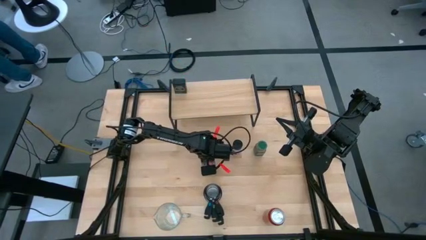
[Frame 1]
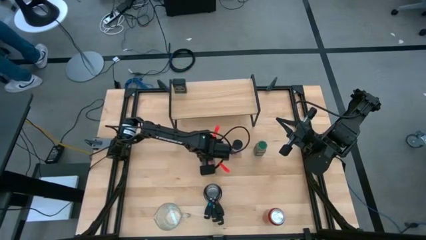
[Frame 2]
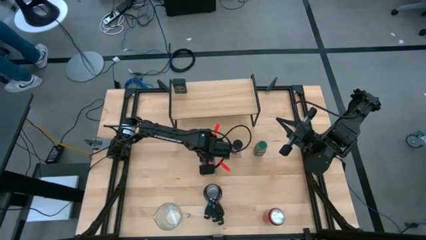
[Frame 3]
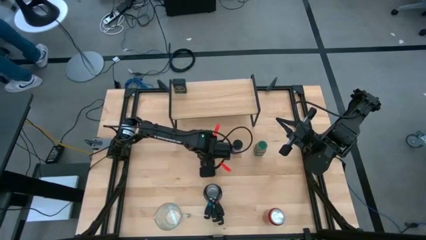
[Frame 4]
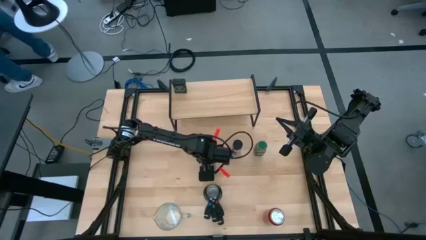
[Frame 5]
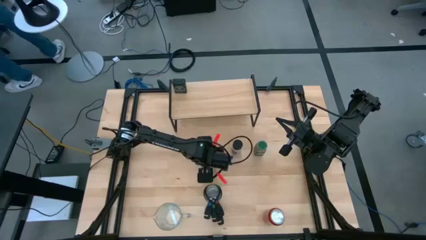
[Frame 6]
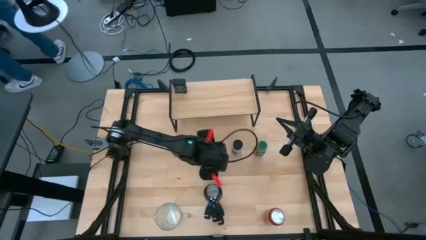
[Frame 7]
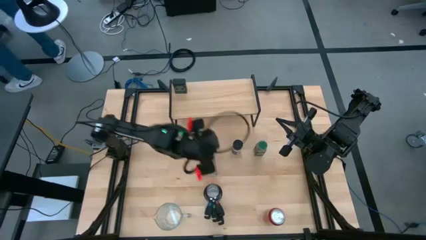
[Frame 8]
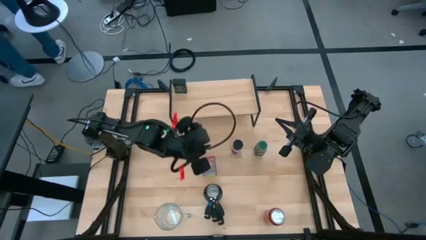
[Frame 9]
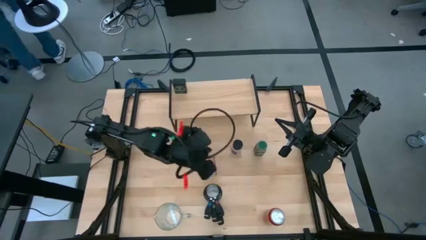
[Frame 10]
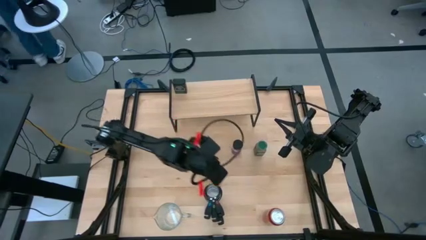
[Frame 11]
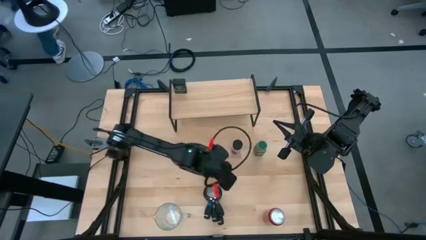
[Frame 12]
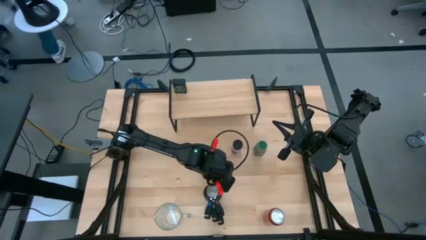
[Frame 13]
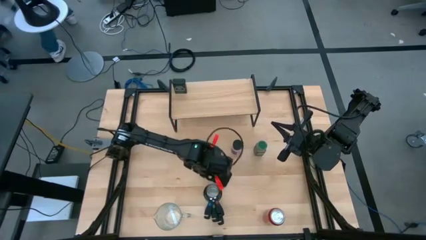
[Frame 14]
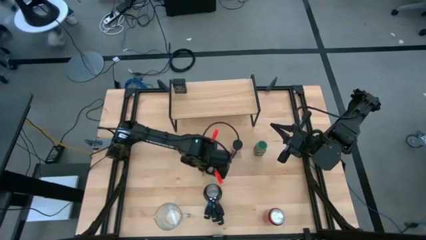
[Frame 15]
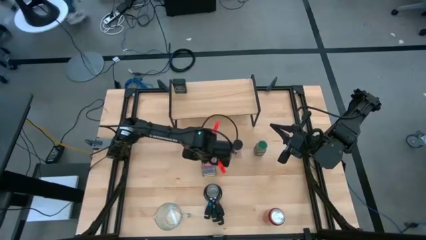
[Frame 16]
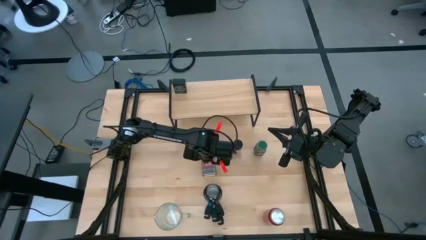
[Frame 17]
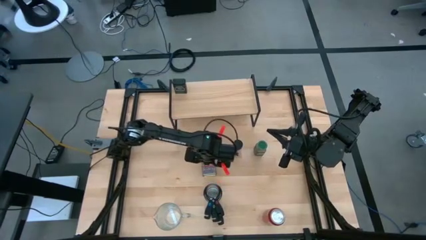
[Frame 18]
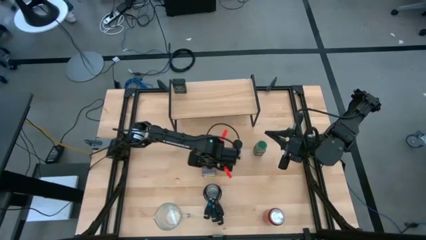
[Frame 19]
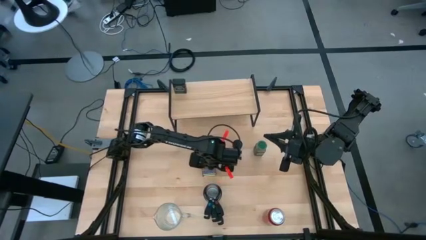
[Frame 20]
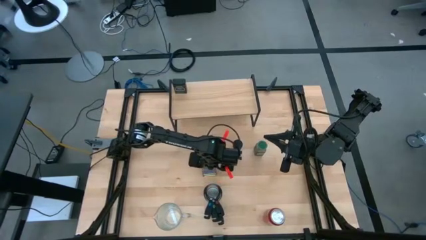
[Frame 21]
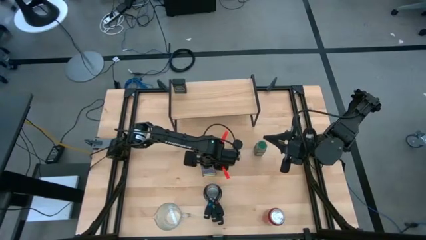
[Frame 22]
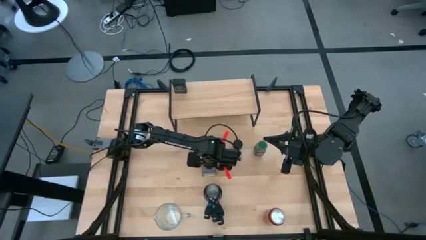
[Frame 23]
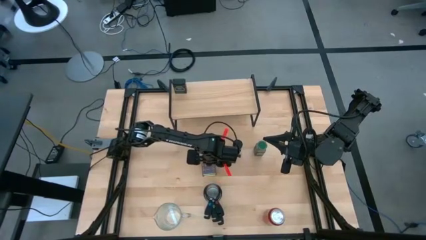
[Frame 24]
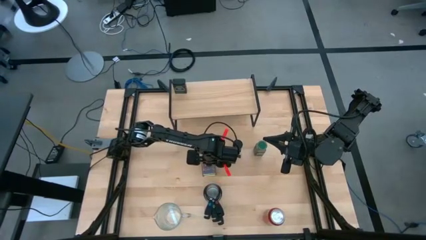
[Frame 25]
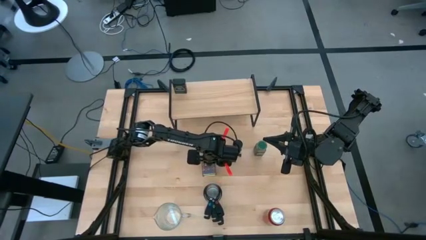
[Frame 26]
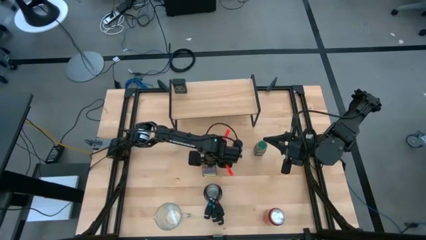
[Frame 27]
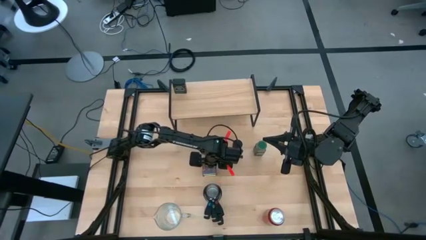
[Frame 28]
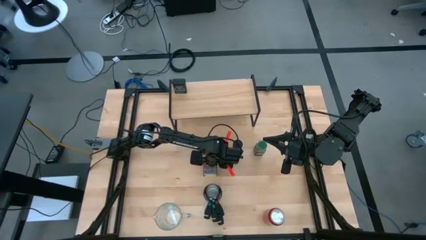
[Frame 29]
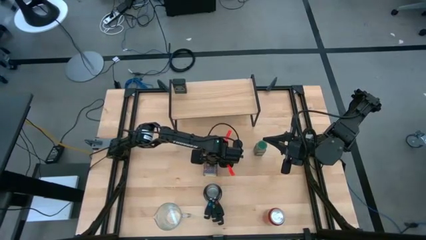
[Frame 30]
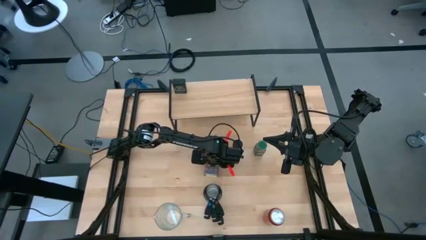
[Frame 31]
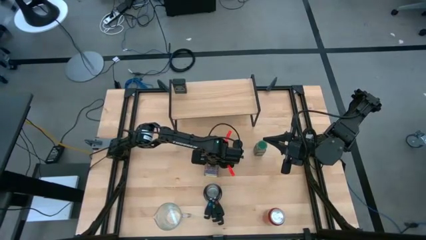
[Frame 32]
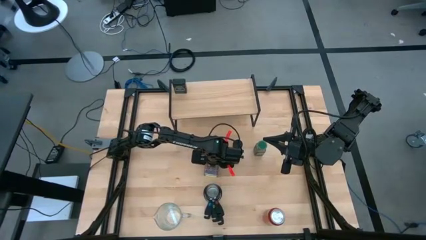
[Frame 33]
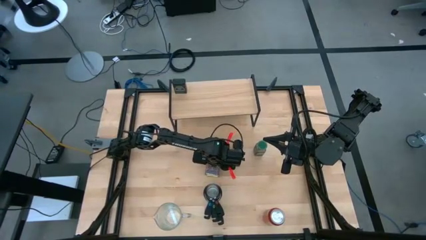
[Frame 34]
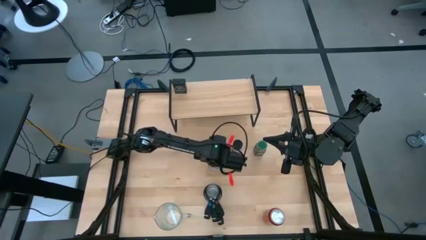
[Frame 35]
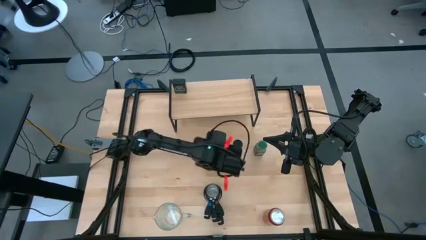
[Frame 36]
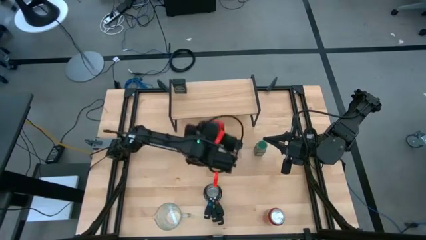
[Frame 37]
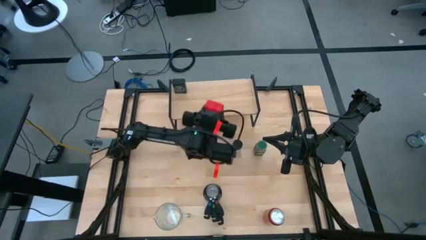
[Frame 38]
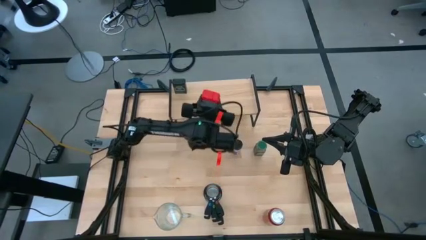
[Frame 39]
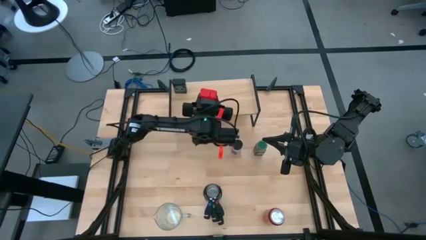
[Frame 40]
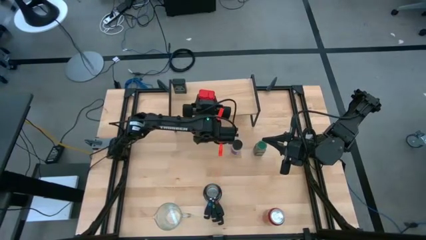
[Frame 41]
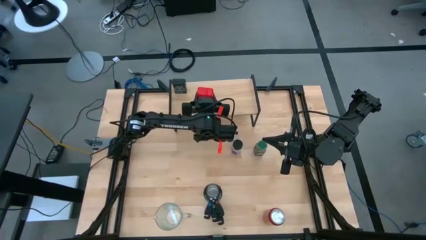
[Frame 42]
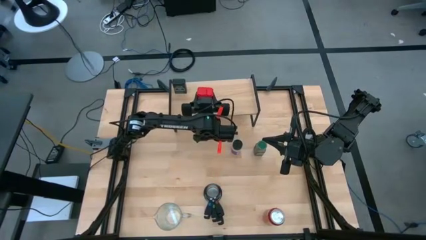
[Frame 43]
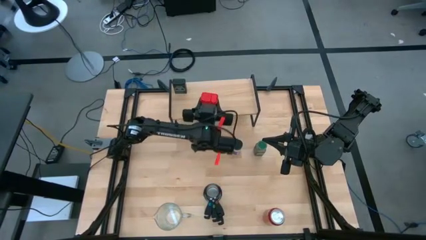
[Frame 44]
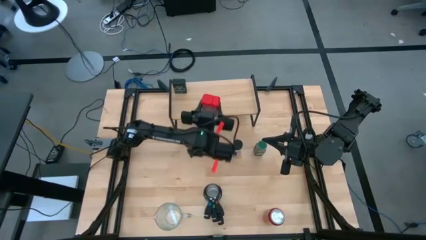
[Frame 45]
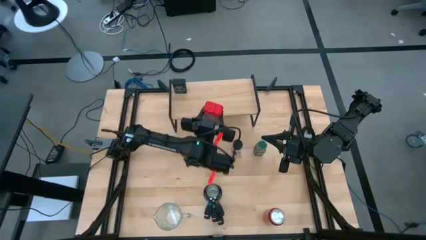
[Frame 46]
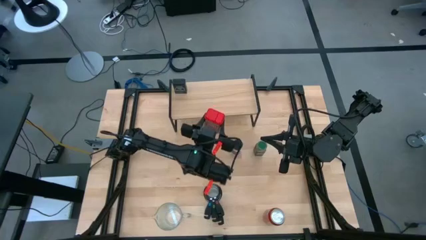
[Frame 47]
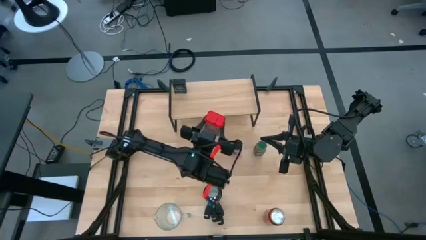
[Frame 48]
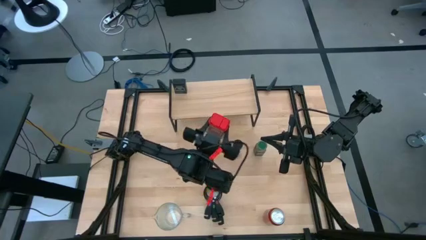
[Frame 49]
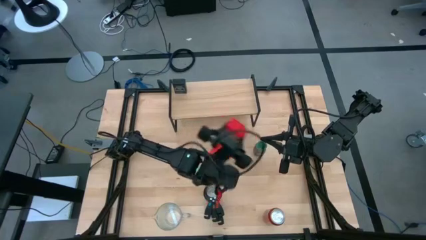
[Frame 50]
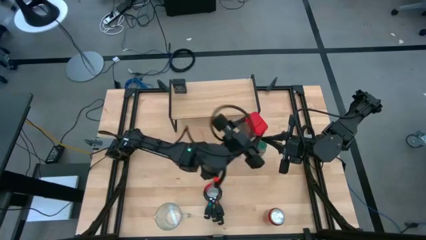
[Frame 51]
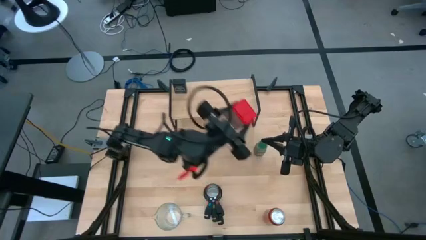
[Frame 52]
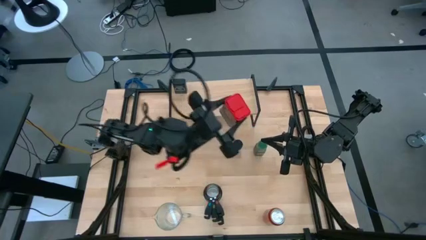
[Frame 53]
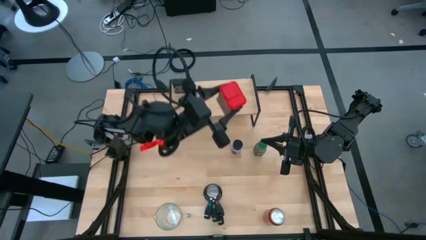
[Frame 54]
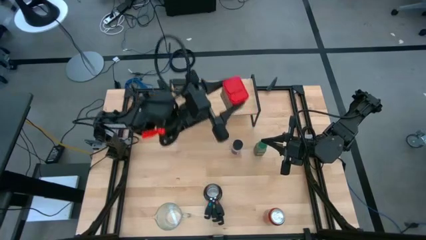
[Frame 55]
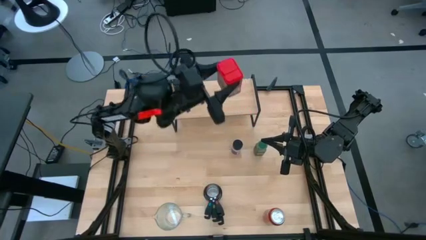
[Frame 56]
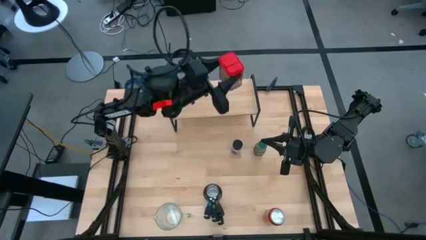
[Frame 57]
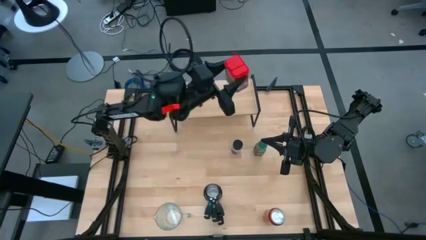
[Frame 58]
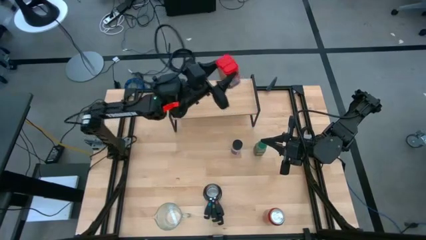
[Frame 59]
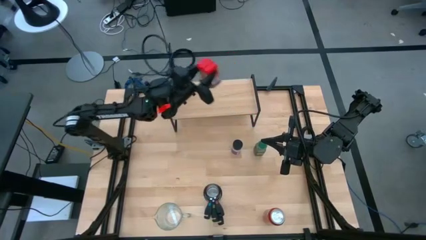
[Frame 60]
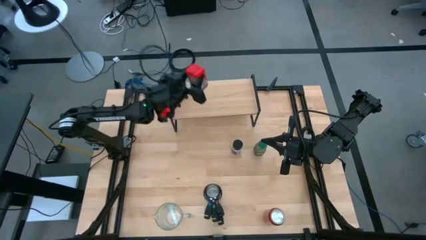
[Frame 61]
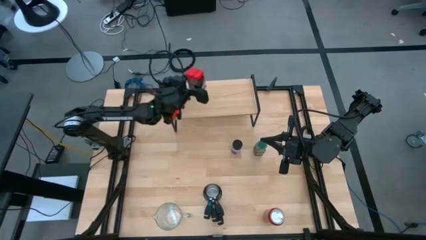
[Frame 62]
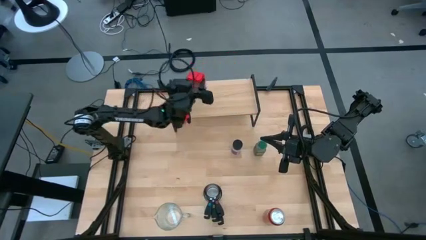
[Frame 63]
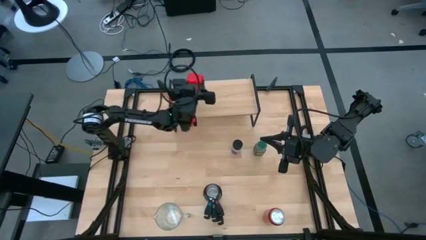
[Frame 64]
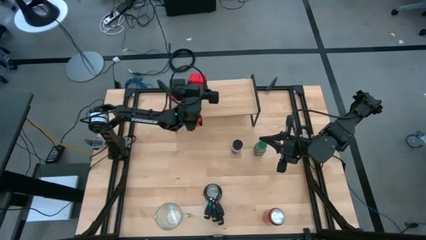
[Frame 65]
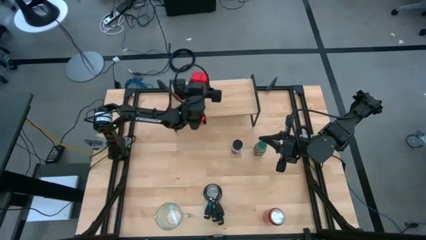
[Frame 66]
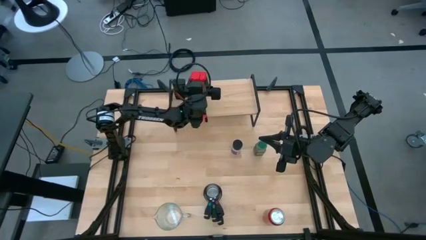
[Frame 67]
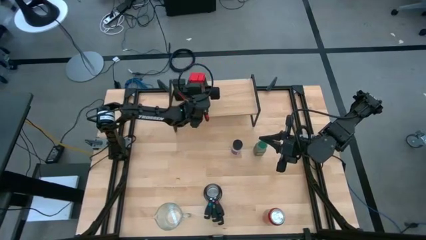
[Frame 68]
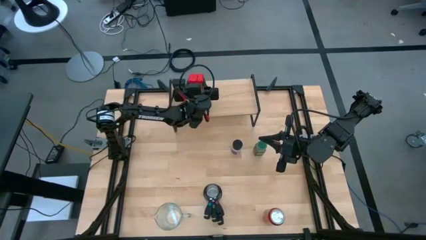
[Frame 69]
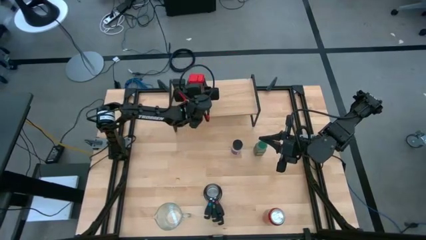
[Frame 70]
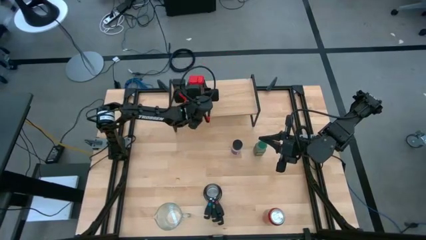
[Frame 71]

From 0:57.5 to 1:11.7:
Task: Shelf spices
Put the red seasoning can on the shelf

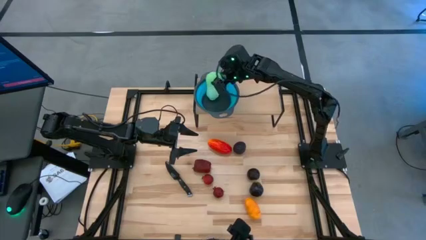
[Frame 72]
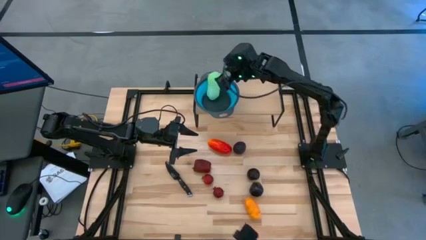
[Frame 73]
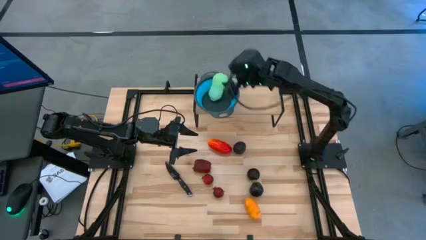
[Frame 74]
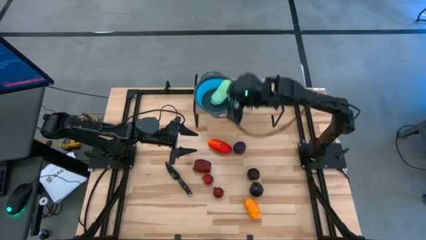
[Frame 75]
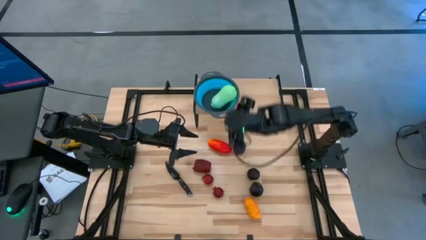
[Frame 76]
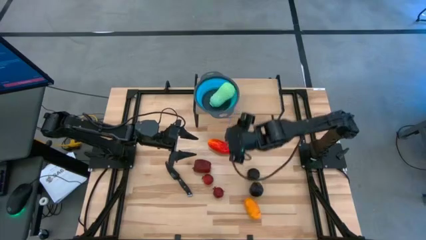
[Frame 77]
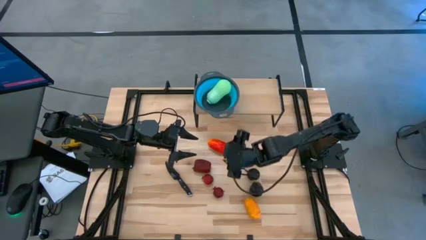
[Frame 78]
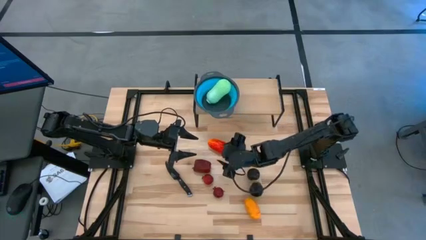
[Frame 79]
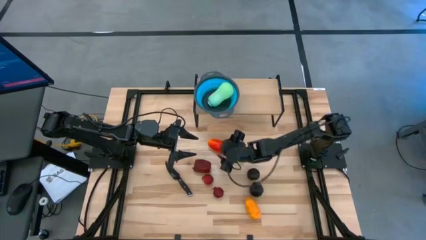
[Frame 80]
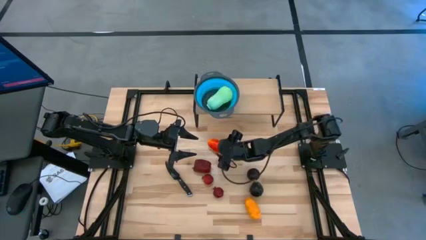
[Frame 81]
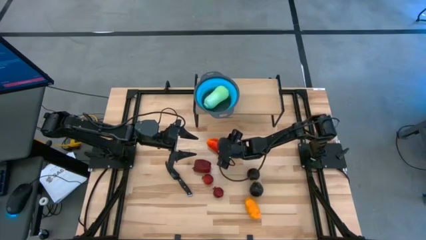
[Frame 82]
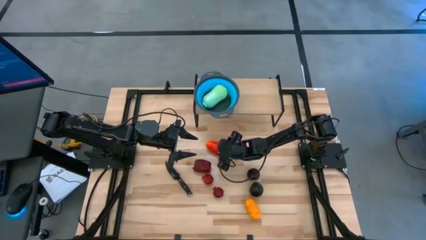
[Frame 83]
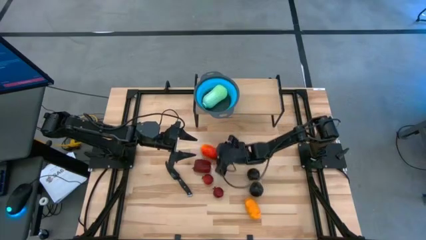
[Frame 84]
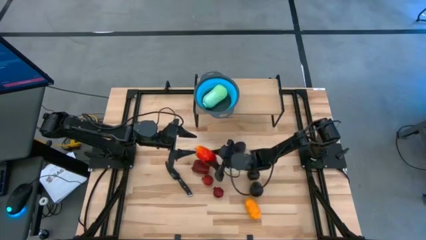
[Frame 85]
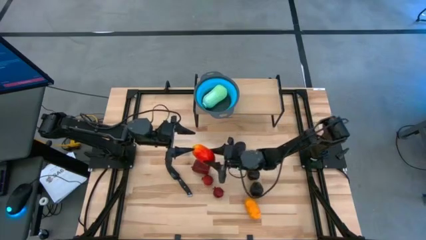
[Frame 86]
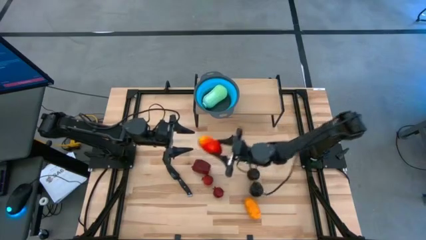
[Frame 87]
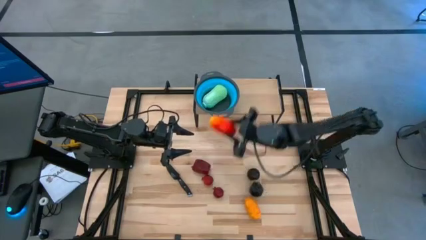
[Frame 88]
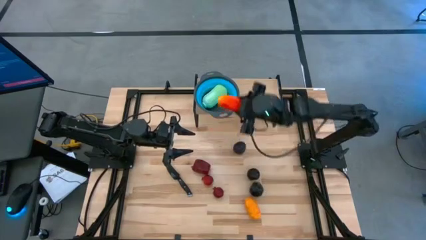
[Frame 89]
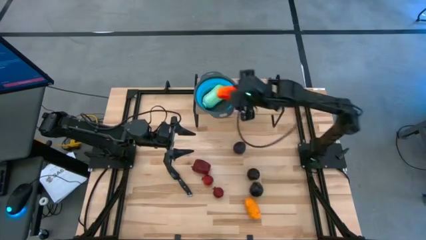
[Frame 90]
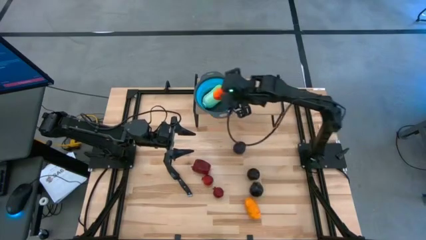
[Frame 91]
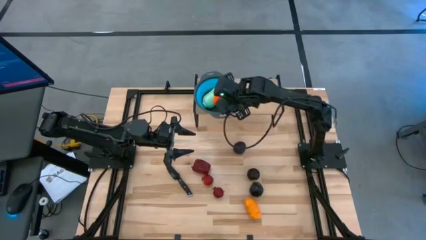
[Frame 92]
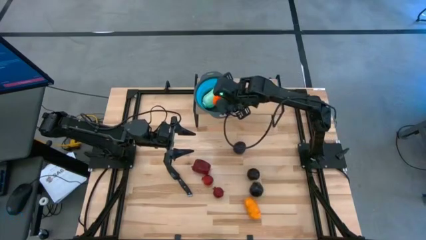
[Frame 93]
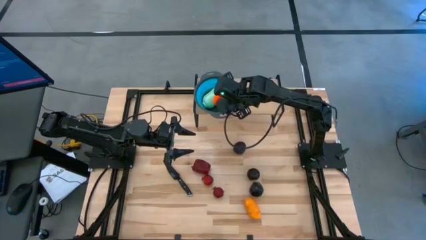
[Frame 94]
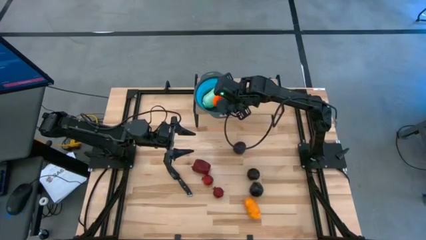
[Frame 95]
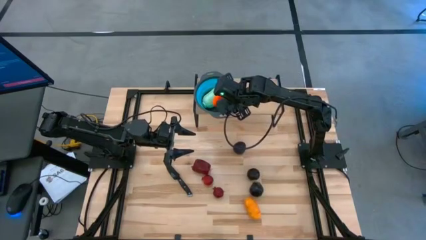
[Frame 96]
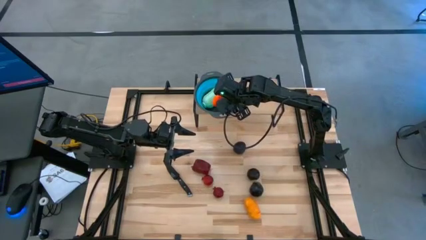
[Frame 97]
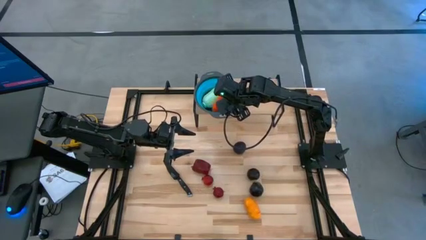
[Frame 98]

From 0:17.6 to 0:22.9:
Task: Pick & Place Fruit
Put the red mango into the blue strainer bowl on the shelf
